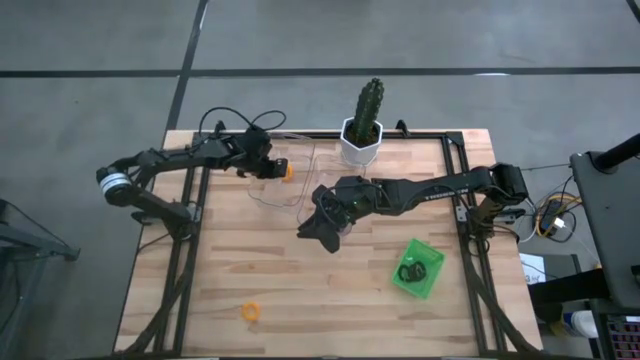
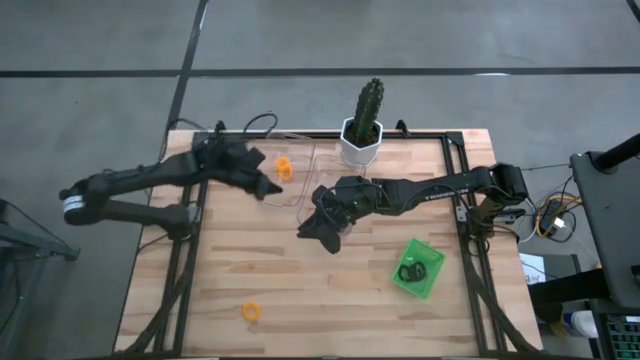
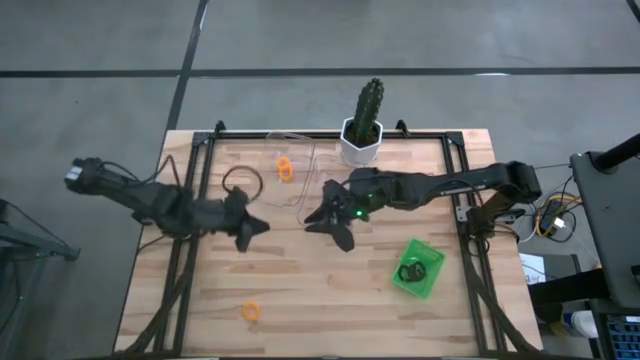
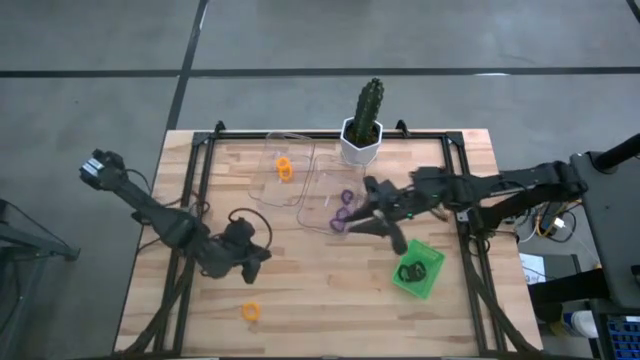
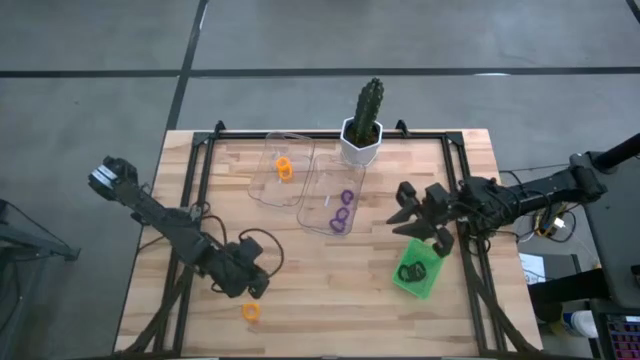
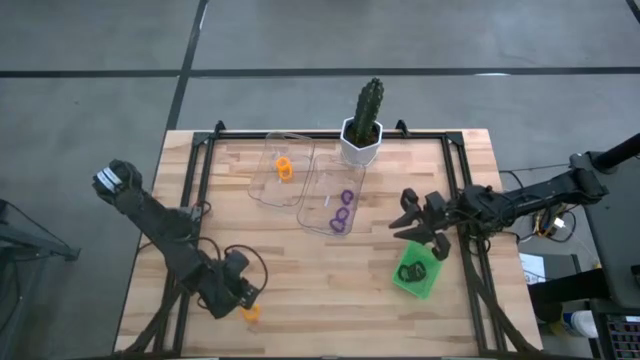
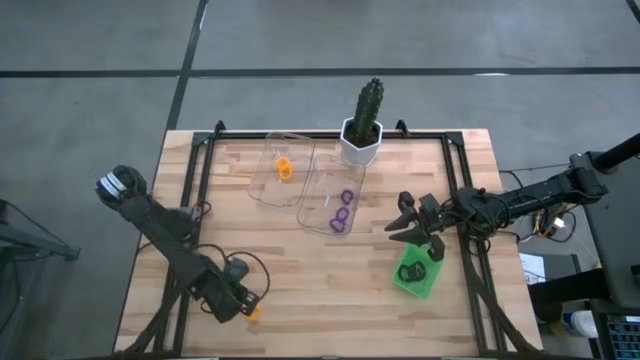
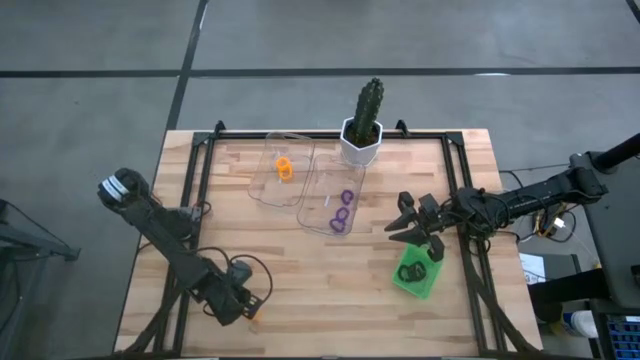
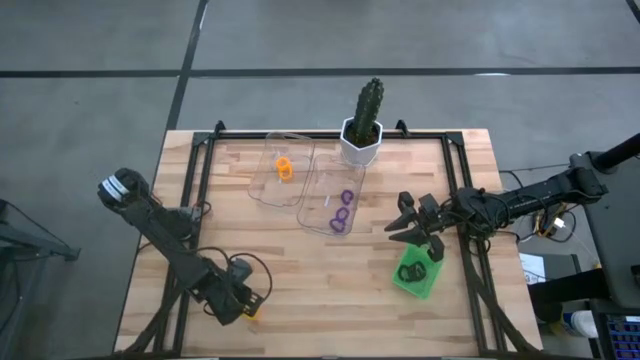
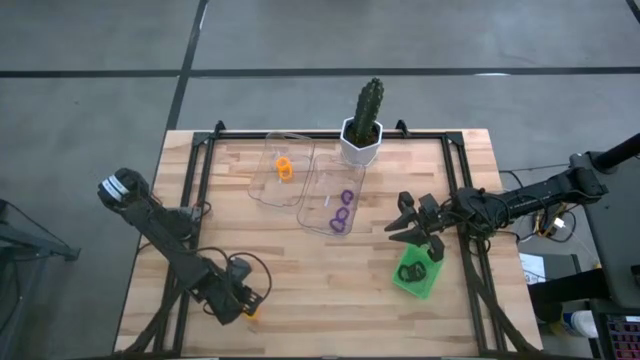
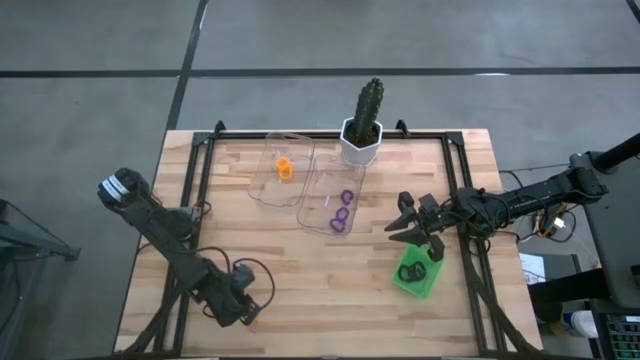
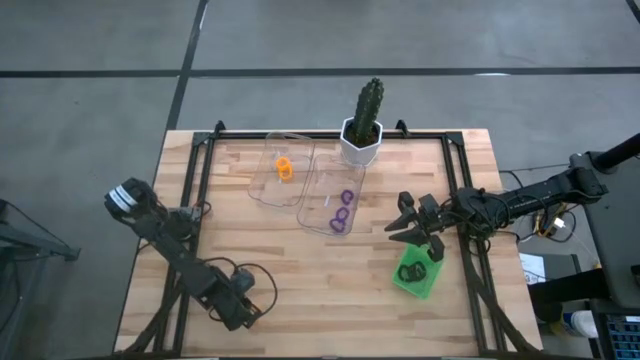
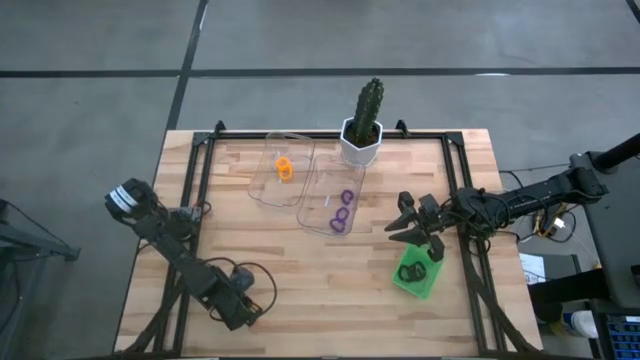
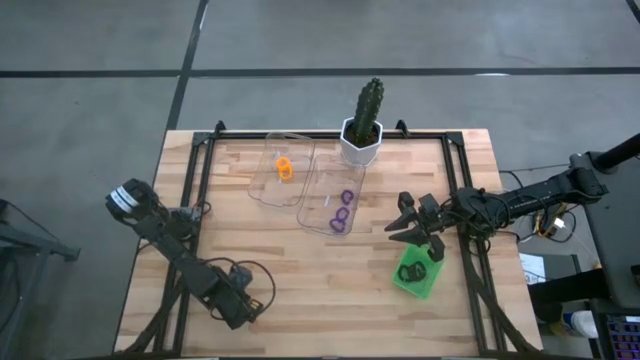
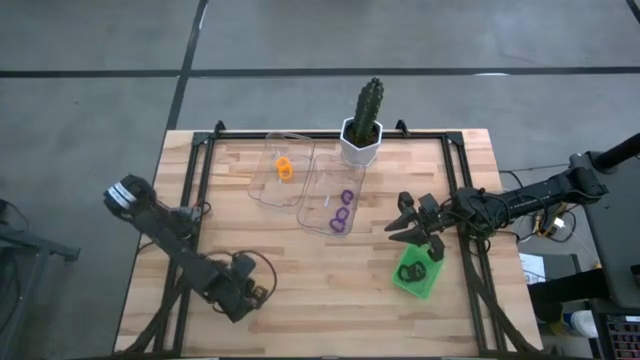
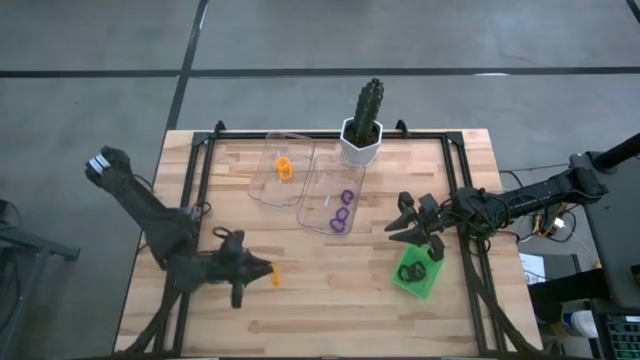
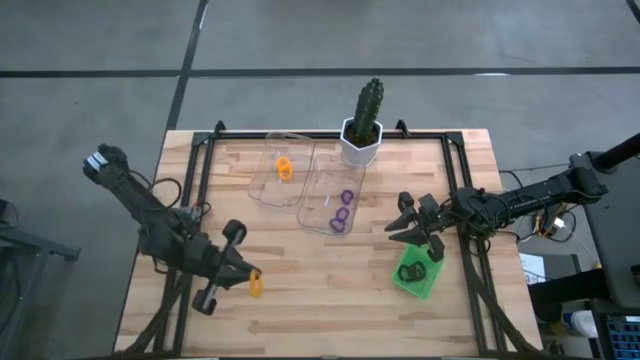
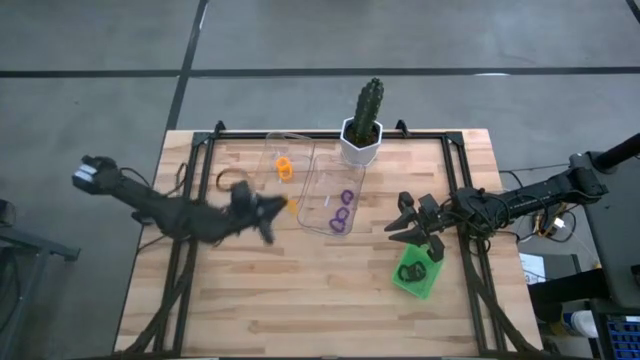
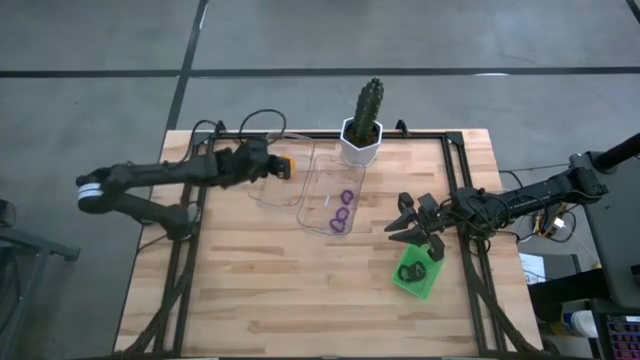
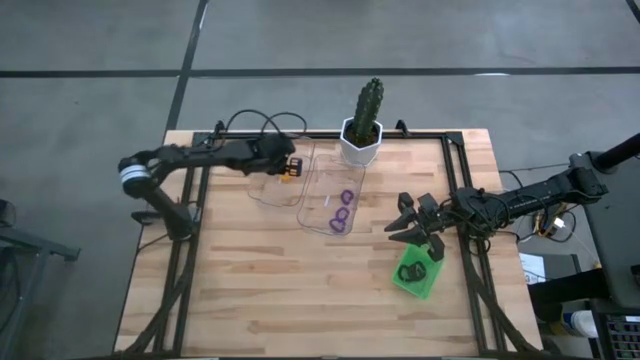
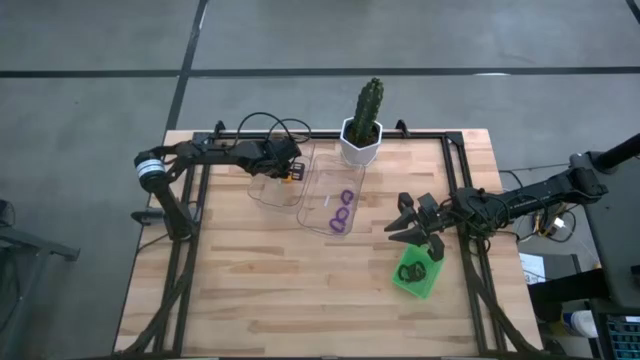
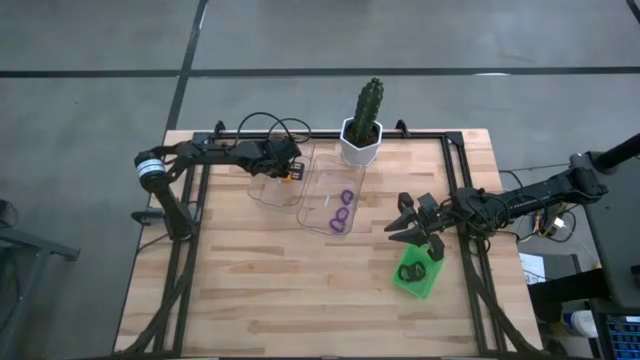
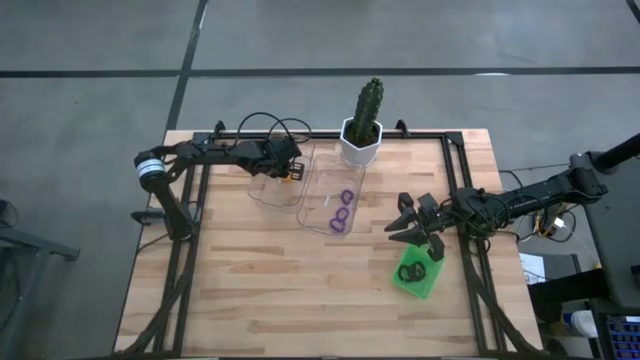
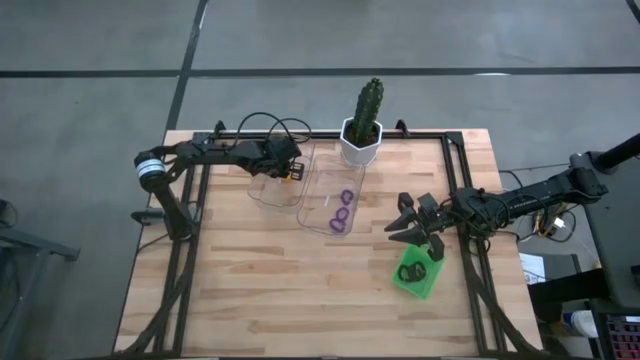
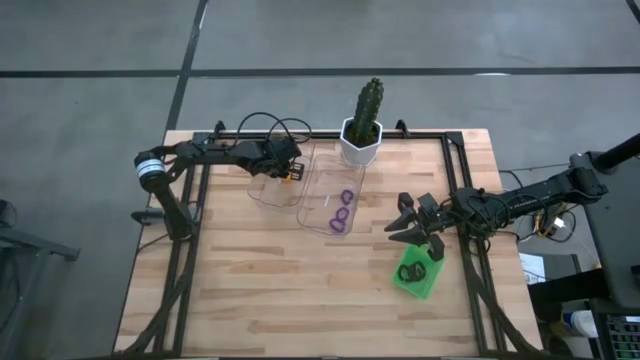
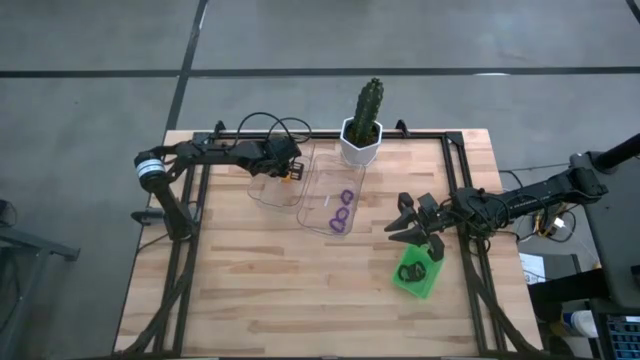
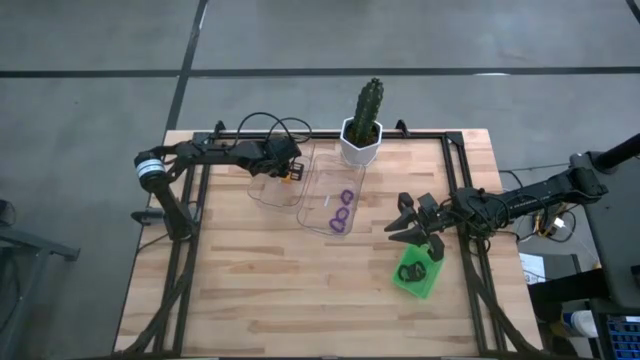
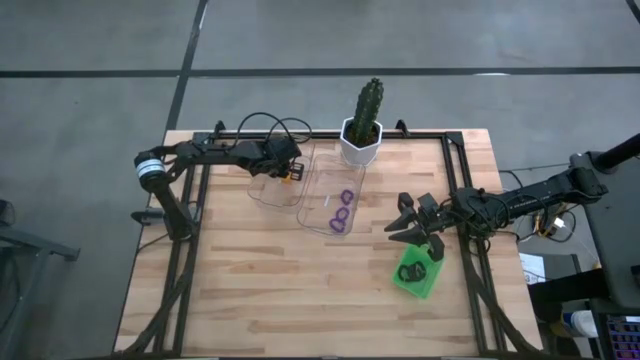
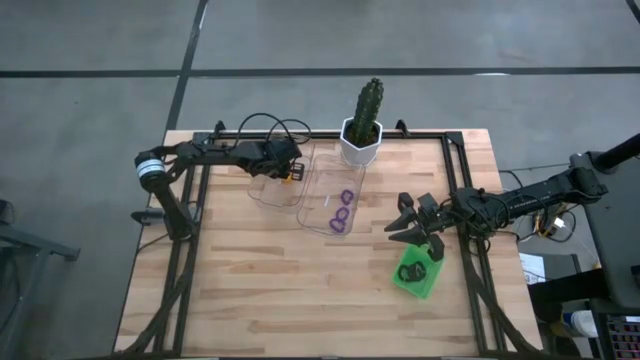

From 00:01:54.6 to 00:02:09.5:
Task: Sort spring keychains
Put the yellow spring keychain into the left transparent bin

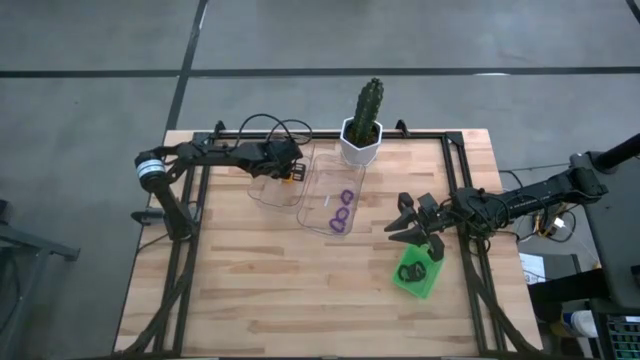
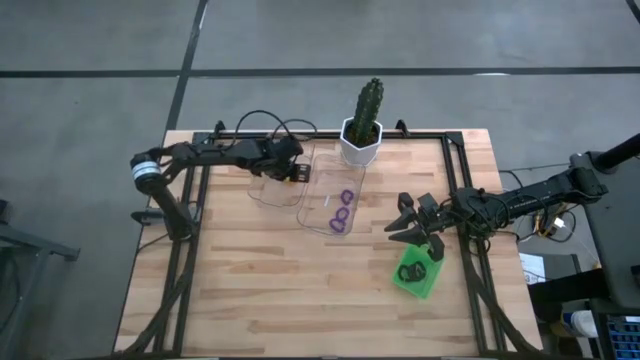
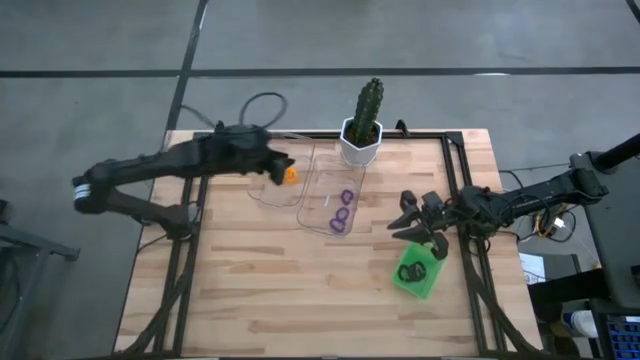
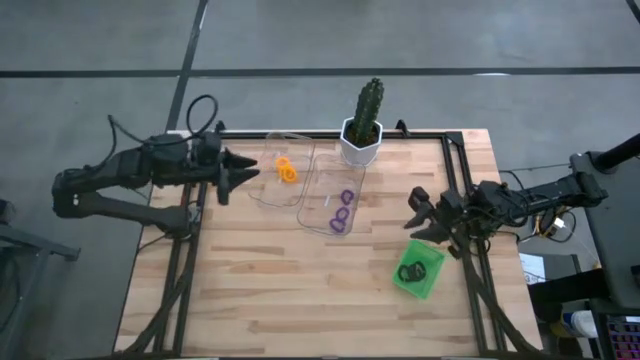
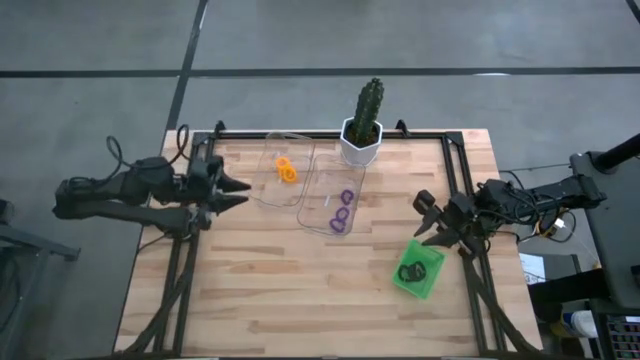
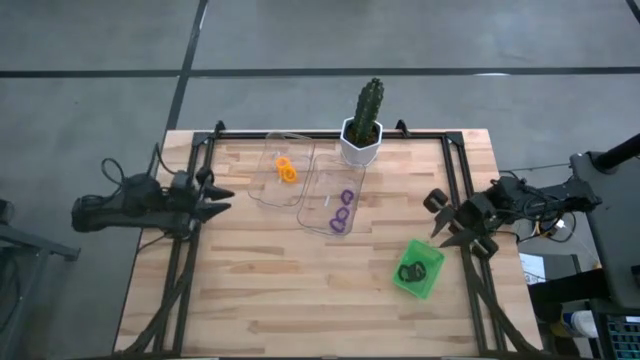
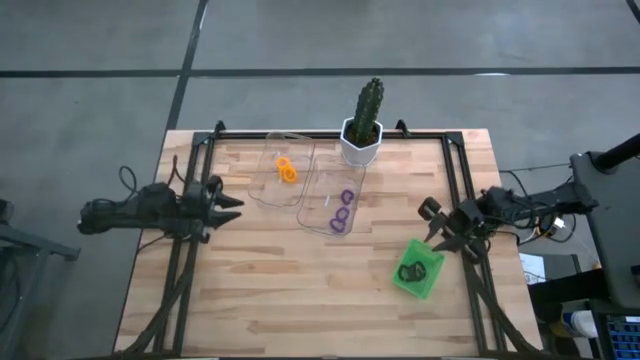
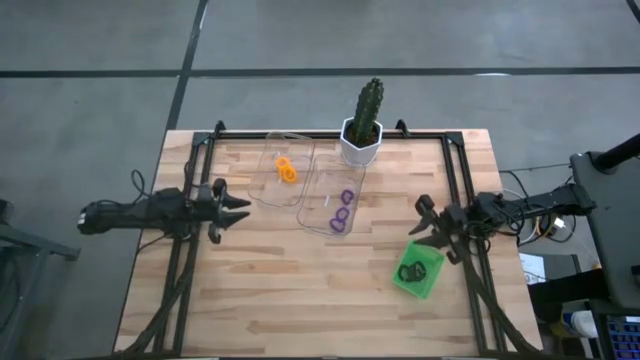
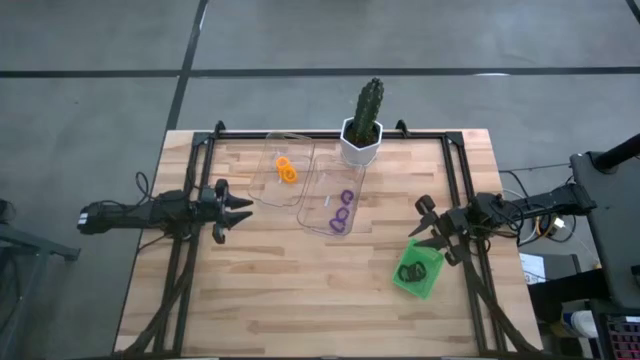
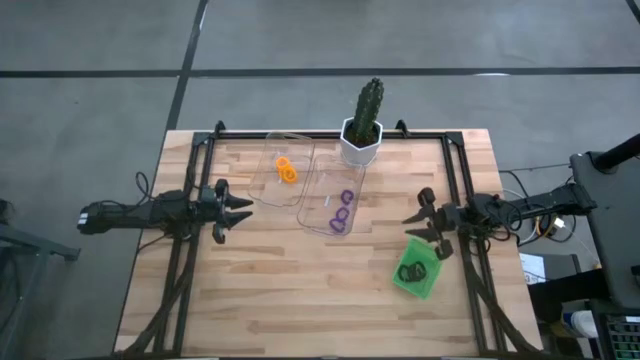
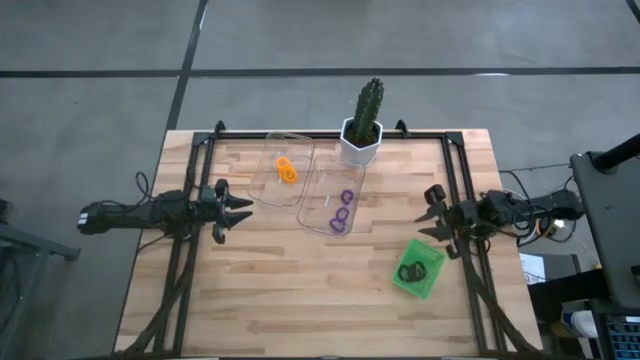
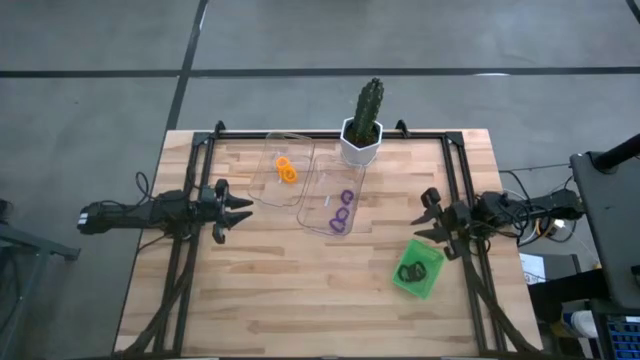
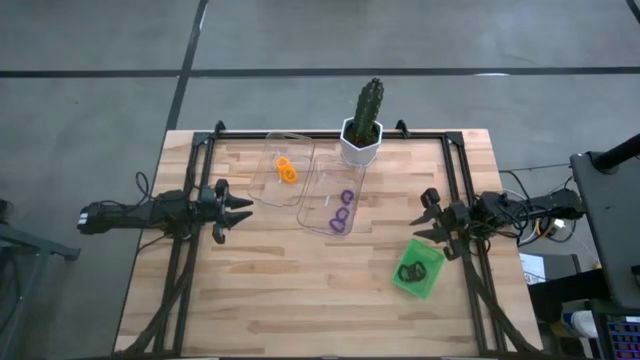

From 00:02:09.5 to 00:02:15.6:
Return to Home Position
